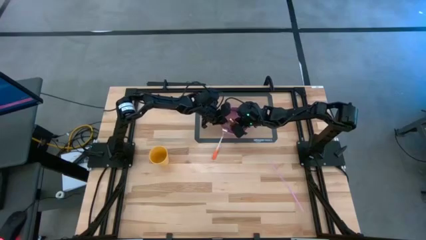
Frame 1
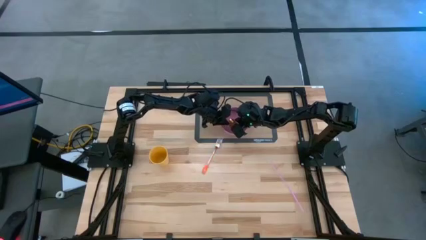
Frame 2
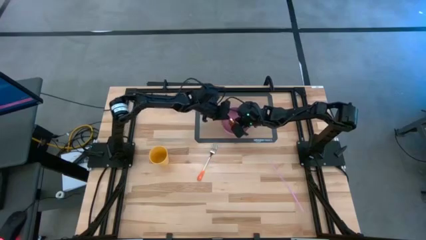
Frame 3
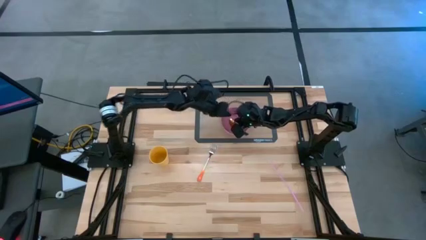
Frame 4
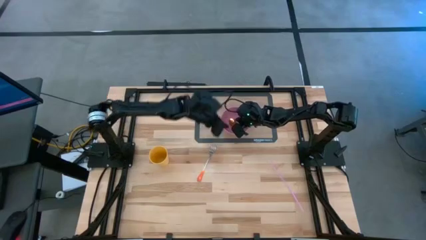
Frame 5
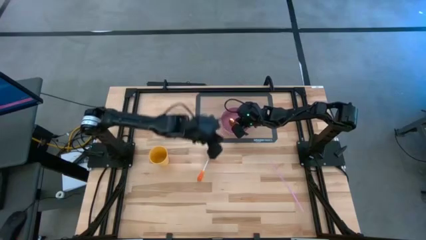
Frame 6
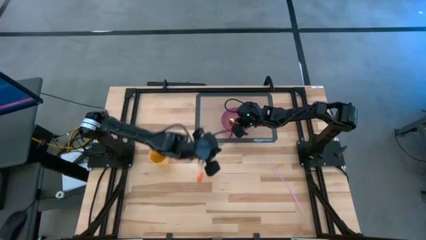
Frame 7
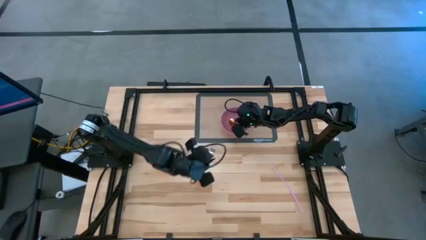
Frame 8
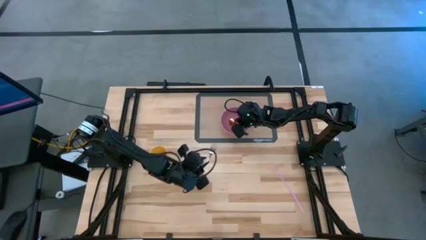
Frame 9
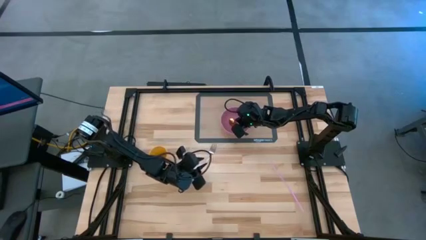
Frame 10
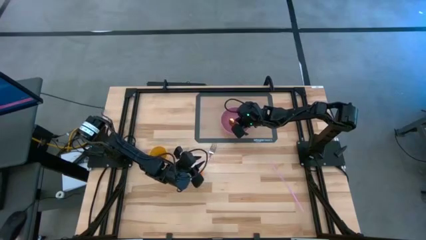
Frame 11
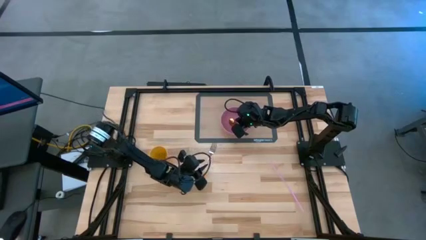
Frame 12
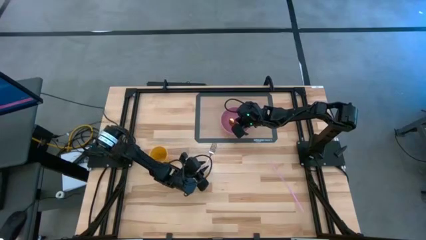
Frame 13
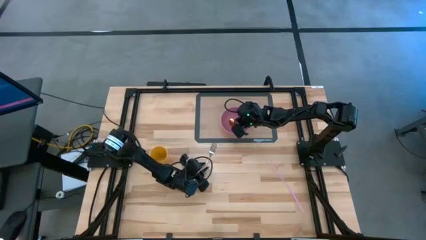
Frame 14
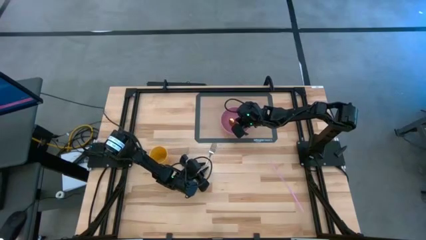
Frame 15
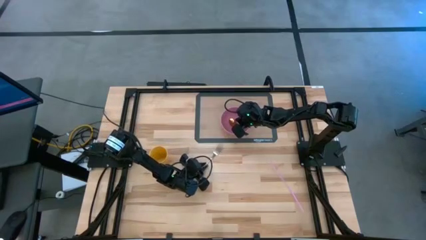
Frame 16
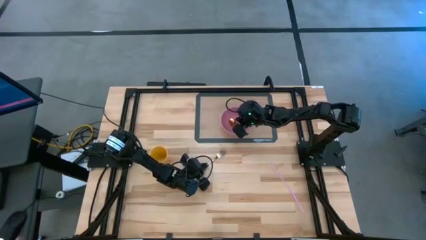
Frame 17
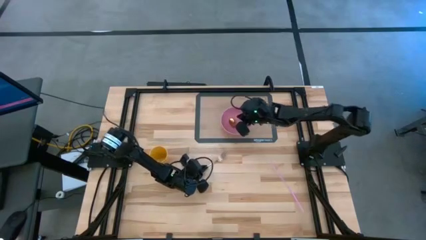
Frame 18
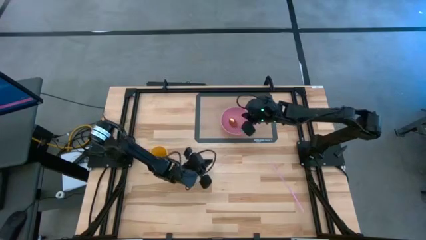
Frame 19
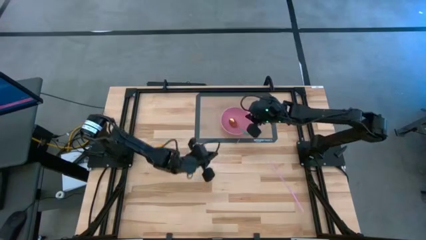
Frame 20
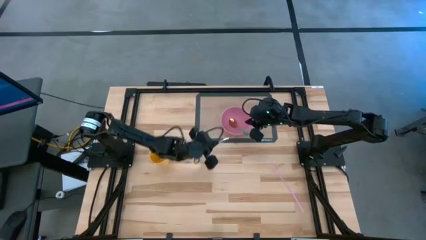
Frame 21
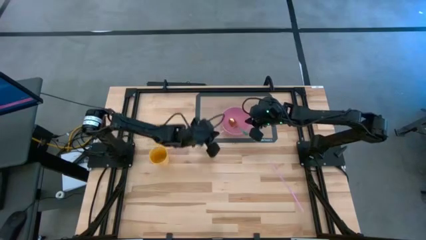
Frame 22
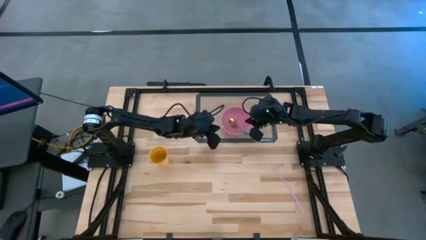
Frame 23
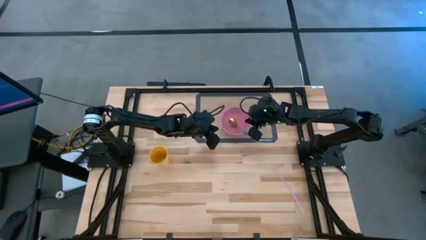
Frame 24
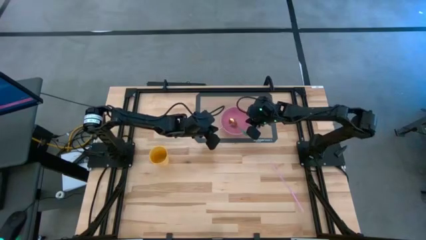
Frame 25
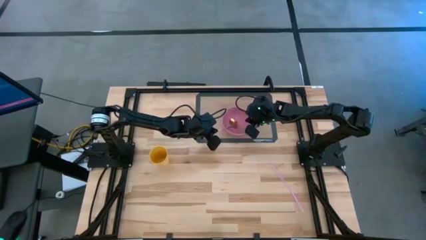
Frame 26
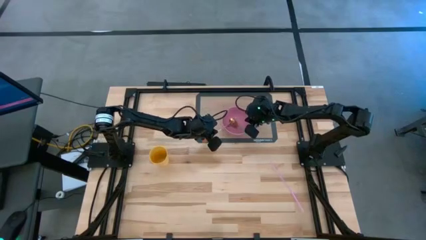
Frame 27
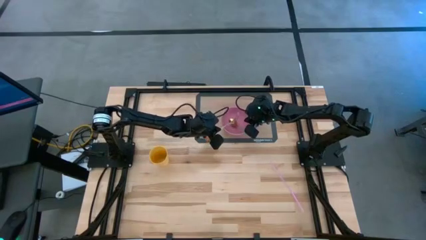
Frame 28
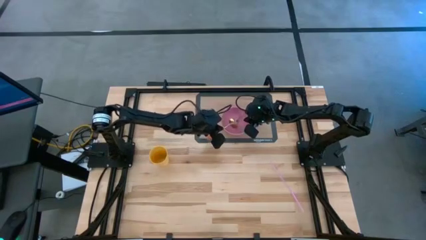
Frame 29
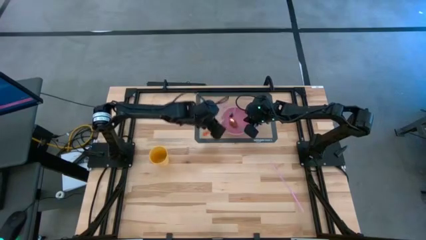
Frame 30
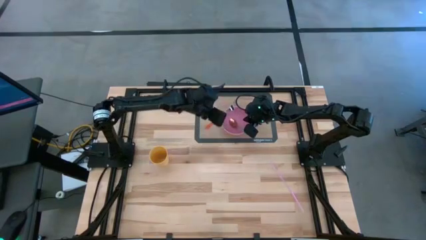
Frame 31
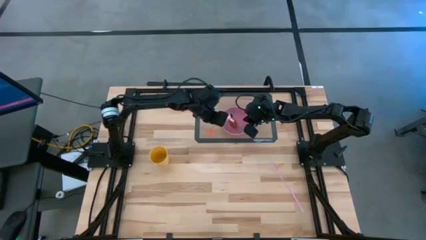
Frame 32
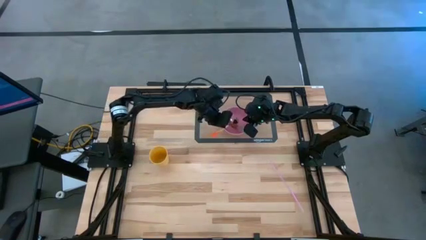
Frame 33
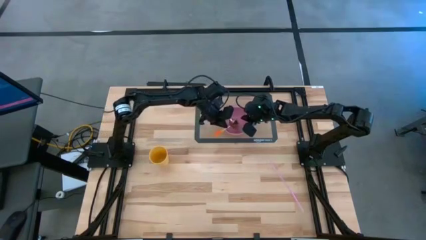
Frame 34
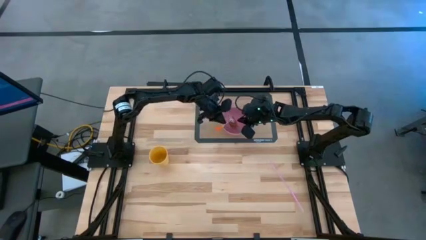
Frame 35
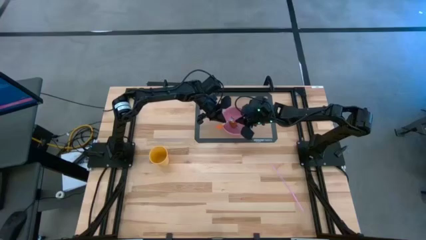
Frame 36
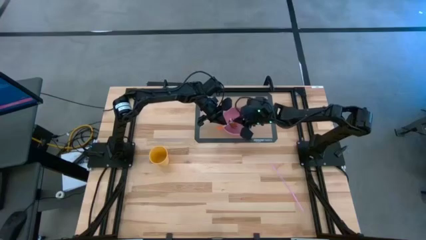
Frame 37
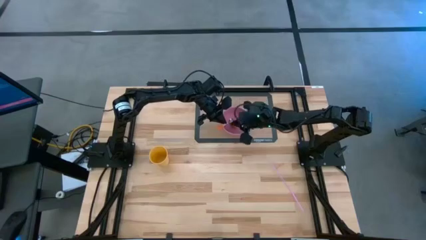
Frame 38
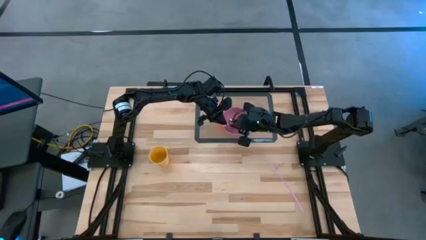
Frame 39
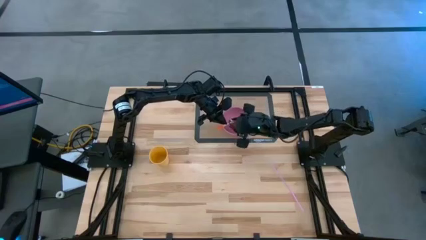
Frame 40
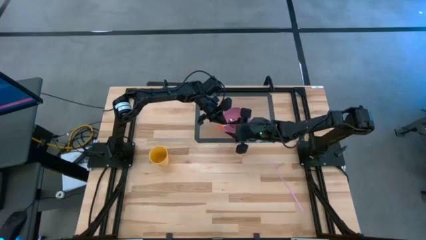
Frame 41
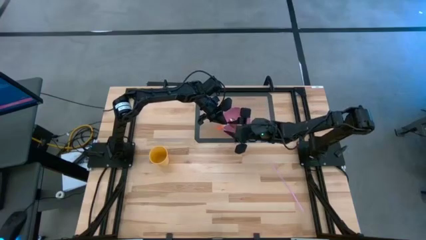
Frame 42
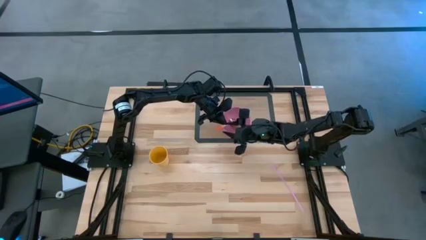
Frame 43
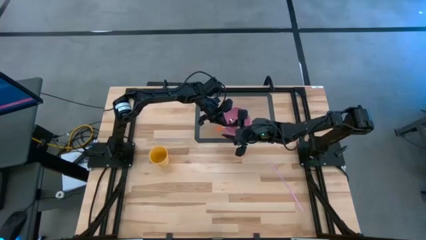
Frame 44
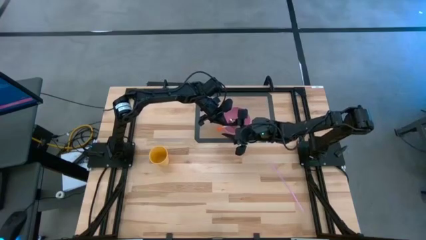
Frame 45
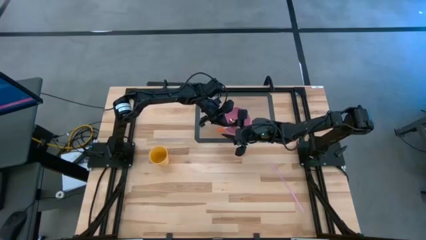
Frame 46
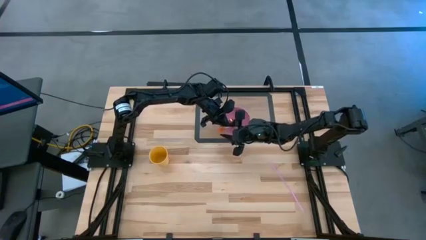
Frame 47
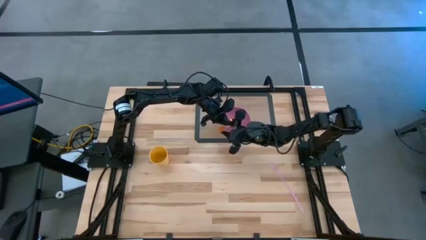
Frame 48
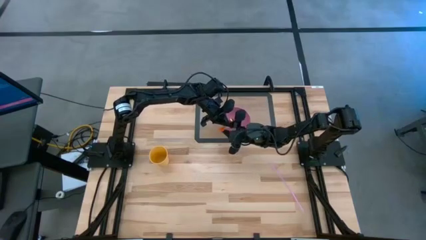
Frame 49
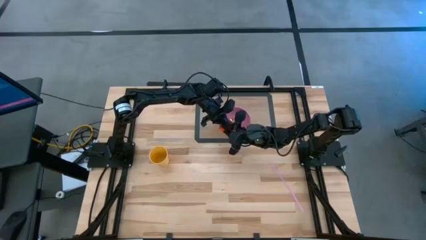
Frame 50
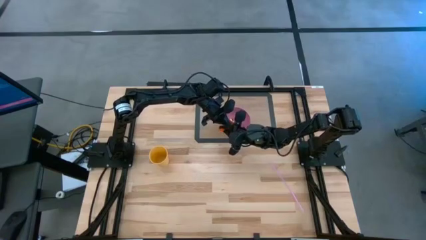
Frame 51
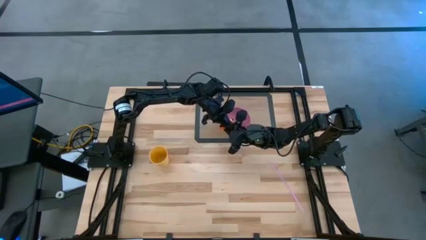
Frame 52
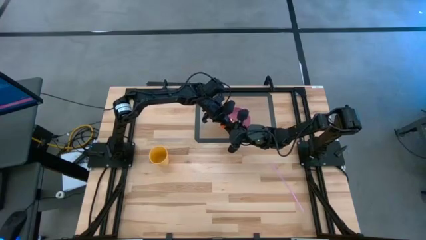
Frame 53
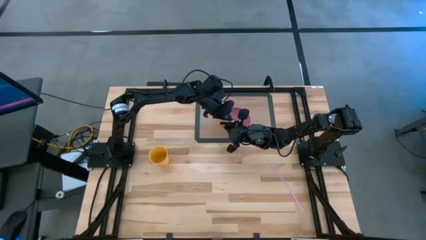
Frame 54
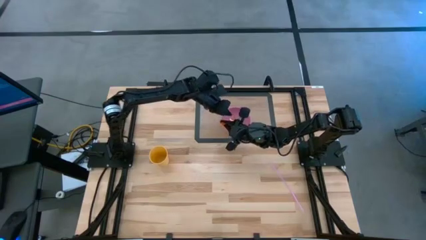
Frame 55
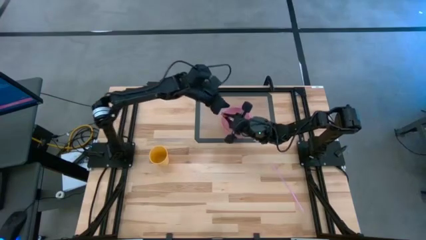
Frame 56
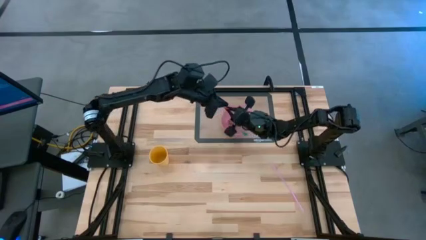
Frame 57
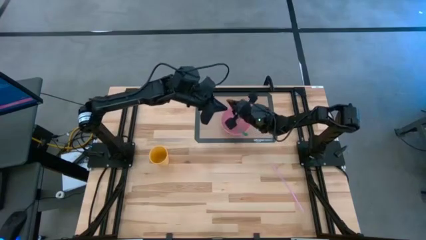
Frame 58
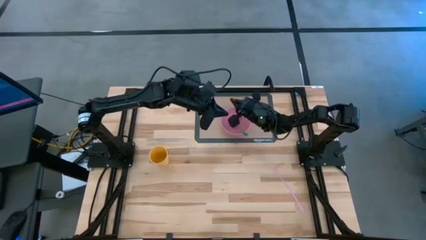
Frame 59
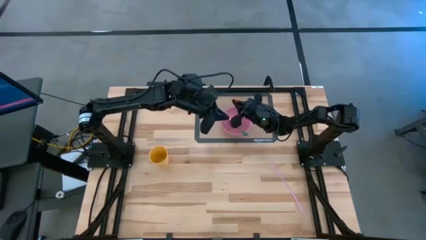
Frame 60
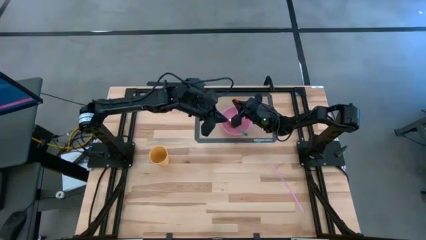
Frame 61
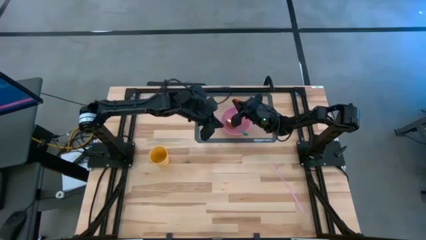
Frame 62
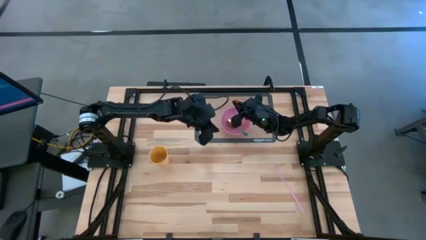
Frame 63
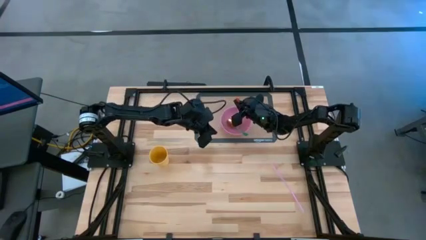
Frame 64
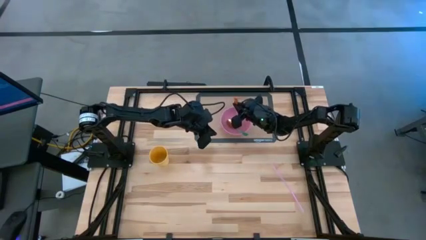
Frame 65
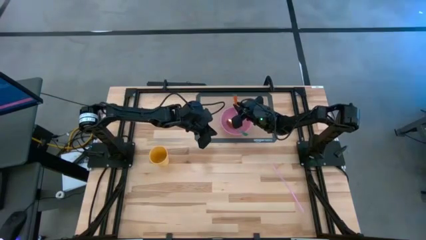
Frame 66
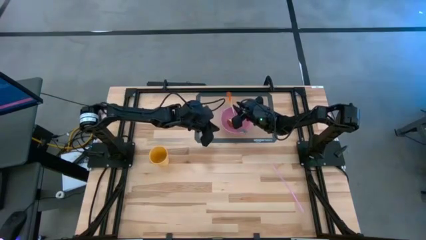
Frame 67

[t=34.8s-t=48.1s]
Task: Pick & Place Utensil
Put the orange fork into the pink bowl

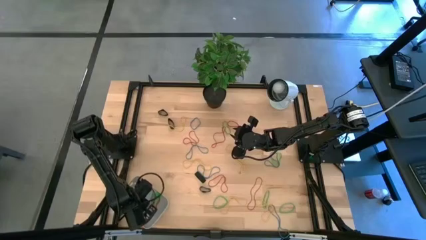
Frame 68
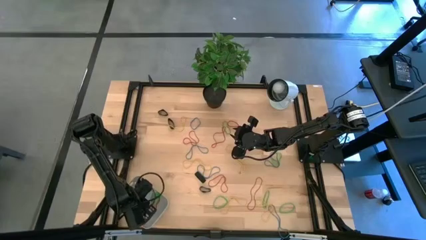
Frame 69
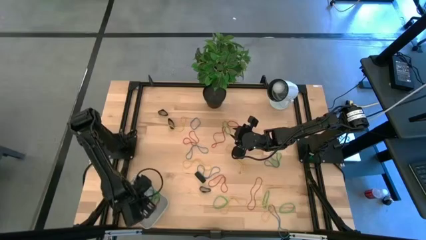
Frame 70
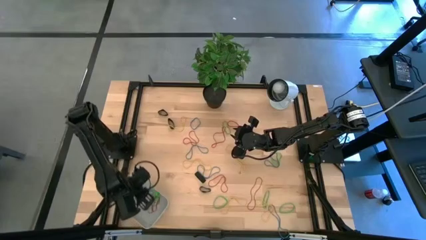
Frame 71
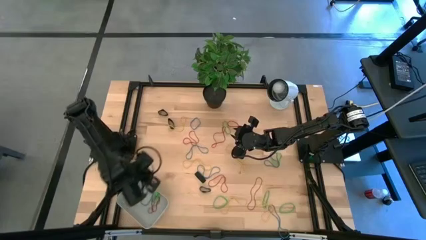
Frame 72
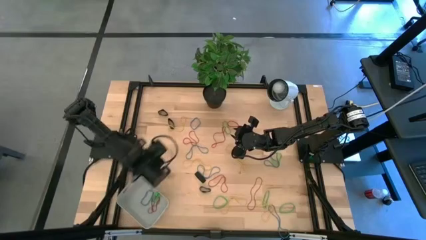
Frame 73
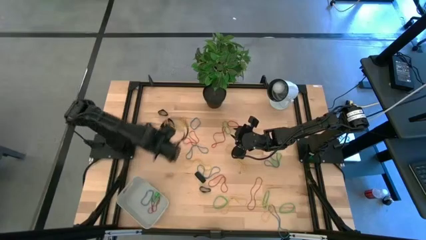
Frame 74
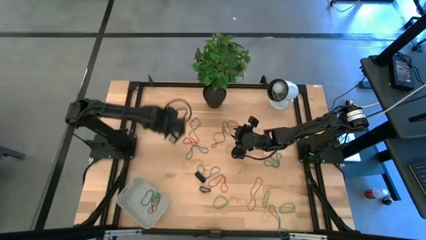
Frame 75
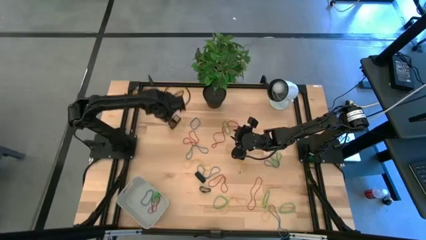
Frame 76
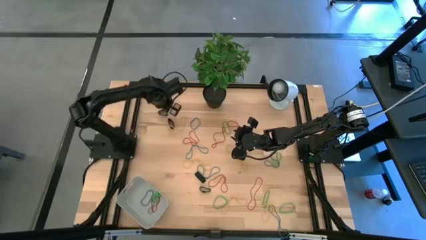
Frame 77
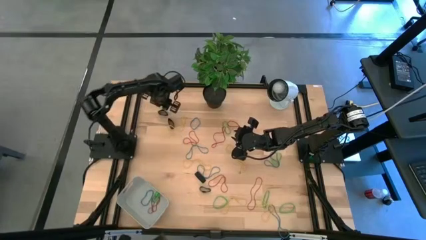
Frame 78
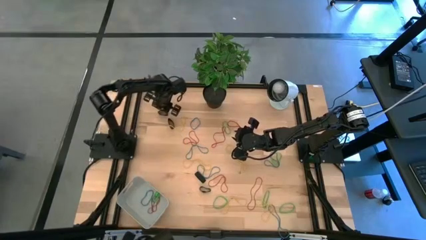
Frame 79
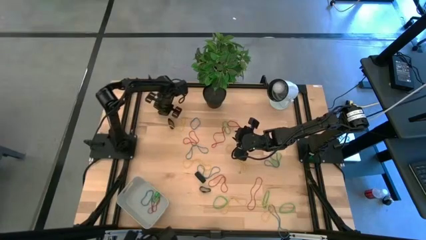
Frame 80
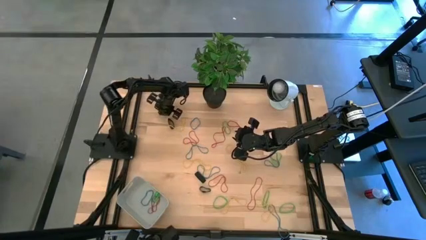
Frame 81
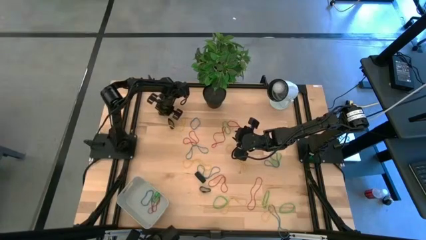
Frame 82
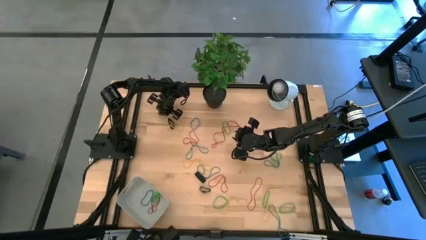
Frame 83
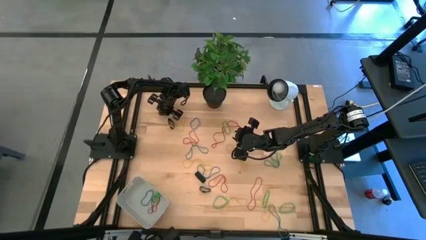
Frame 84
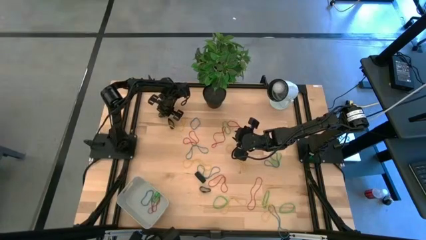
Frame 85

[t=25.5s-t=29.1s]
Task: Pick and place rubber bands into bin
Put the black rubber band into the gray bin
